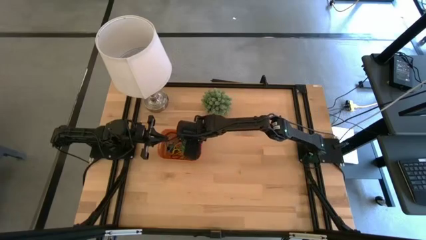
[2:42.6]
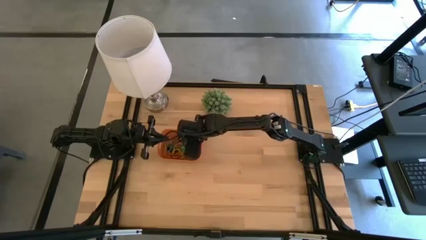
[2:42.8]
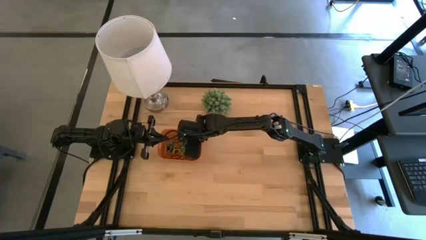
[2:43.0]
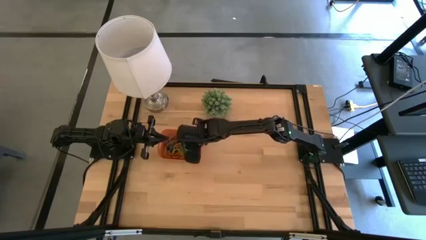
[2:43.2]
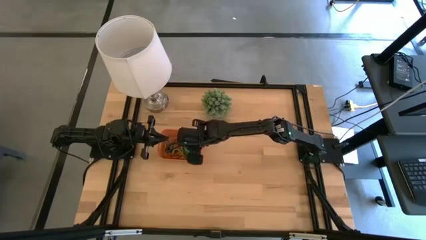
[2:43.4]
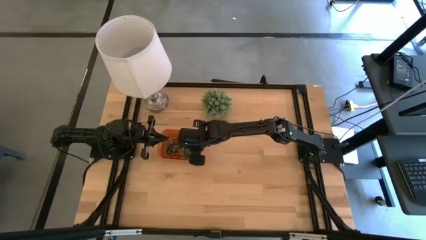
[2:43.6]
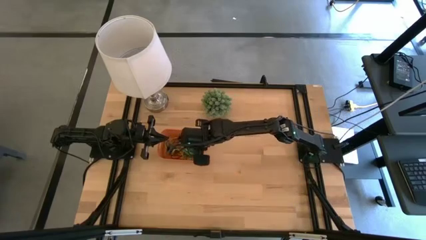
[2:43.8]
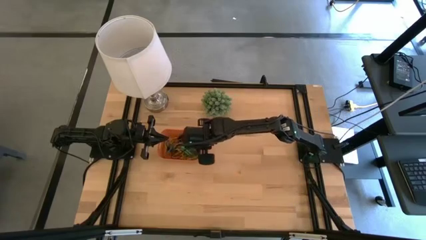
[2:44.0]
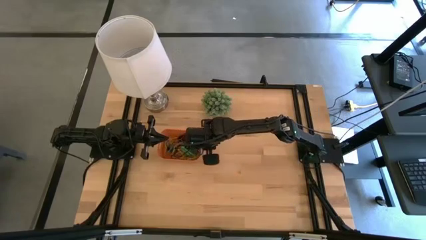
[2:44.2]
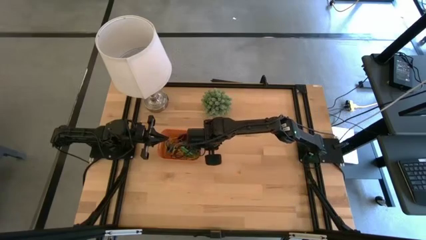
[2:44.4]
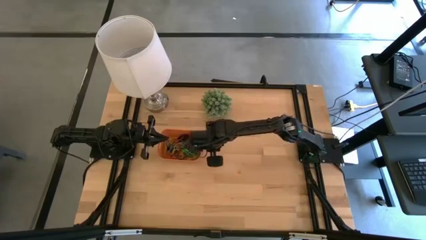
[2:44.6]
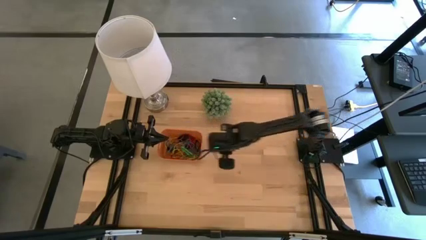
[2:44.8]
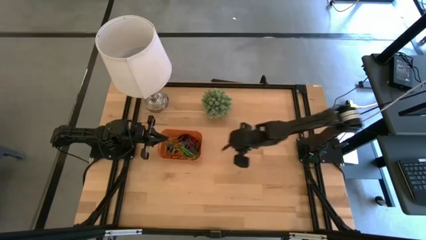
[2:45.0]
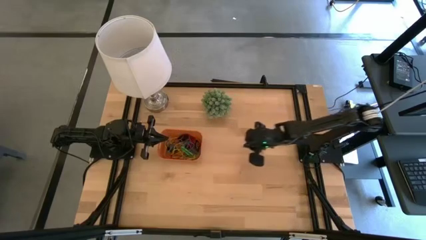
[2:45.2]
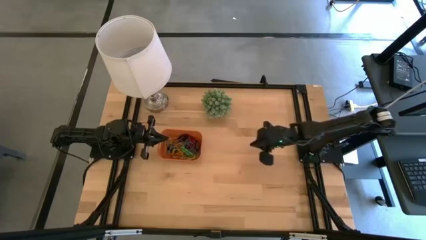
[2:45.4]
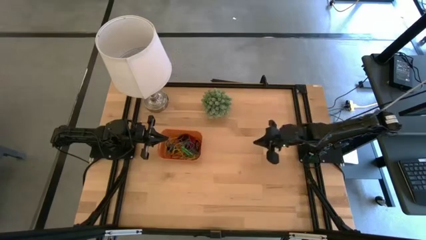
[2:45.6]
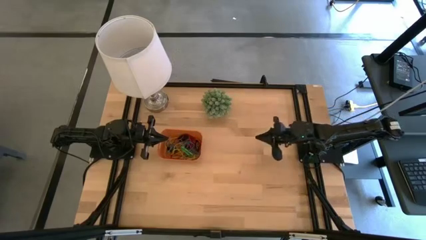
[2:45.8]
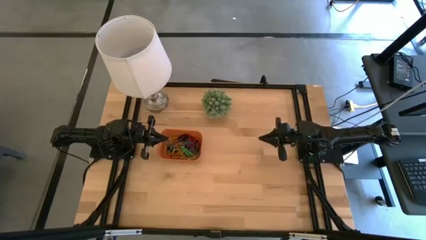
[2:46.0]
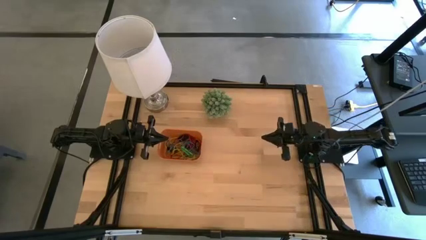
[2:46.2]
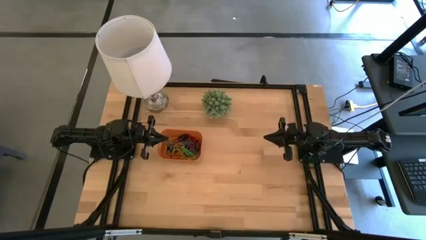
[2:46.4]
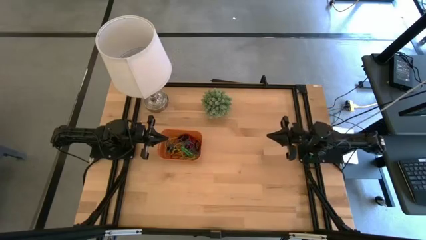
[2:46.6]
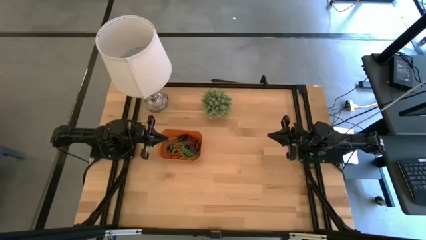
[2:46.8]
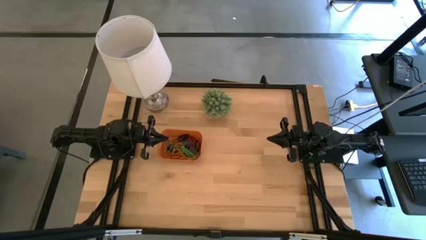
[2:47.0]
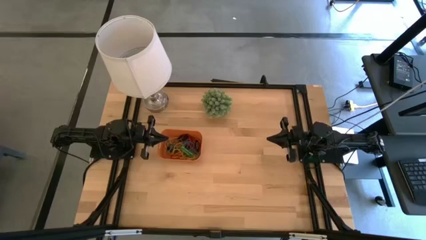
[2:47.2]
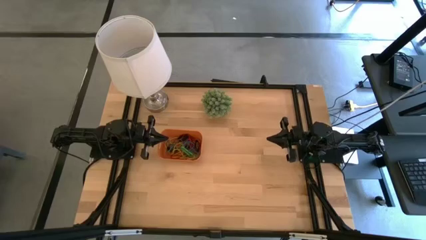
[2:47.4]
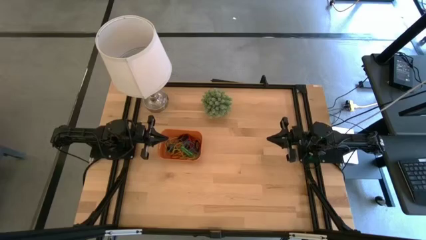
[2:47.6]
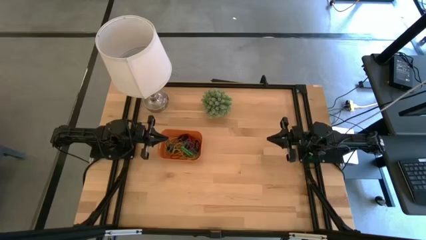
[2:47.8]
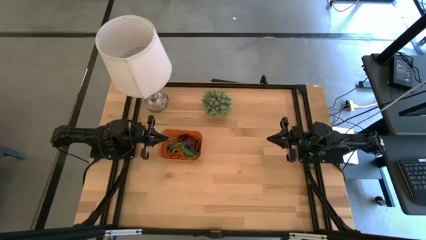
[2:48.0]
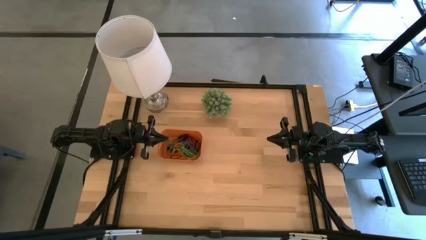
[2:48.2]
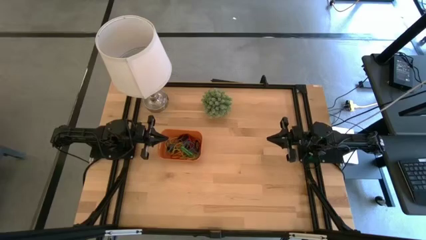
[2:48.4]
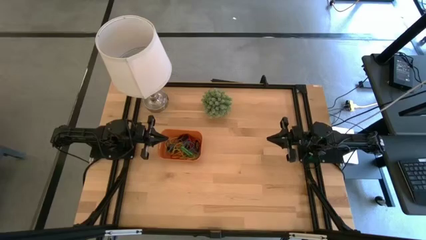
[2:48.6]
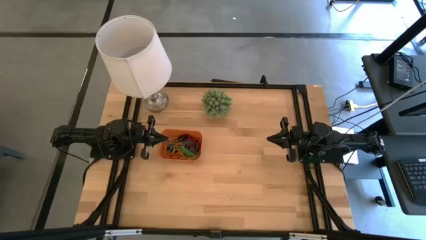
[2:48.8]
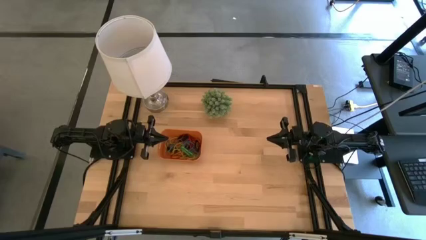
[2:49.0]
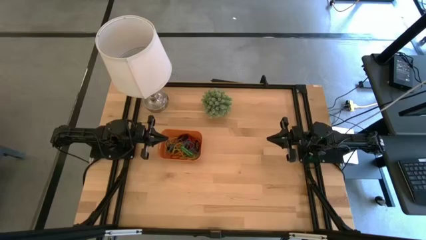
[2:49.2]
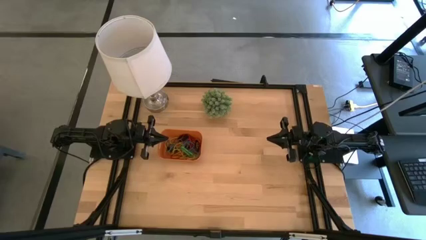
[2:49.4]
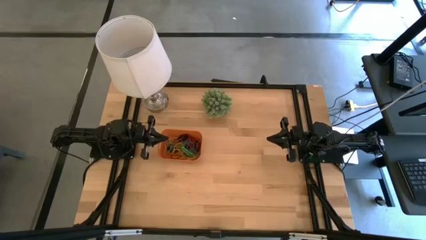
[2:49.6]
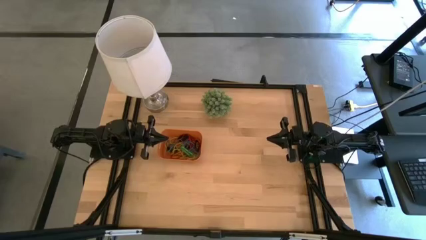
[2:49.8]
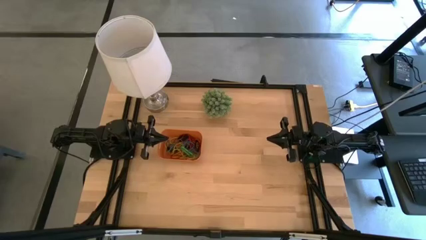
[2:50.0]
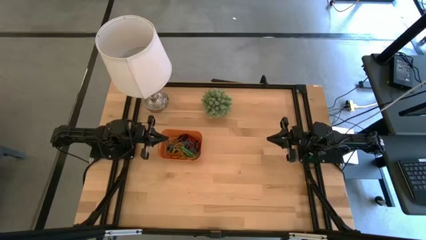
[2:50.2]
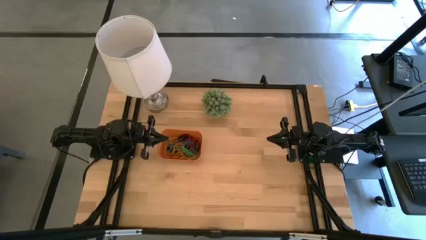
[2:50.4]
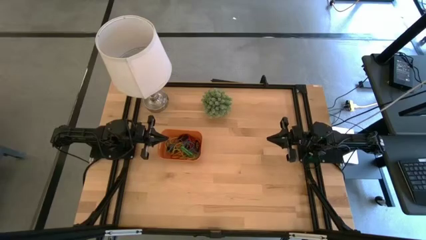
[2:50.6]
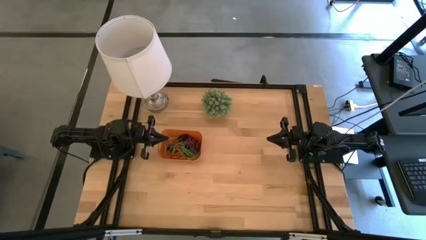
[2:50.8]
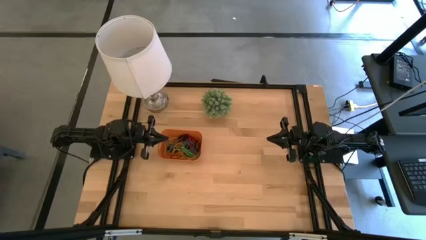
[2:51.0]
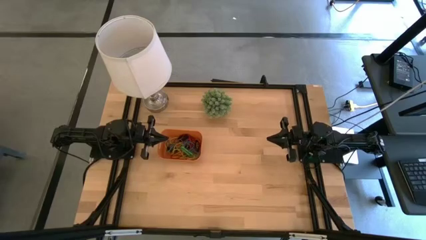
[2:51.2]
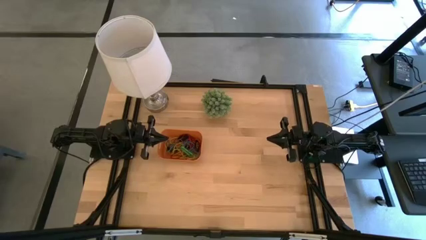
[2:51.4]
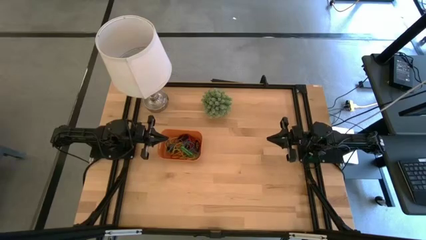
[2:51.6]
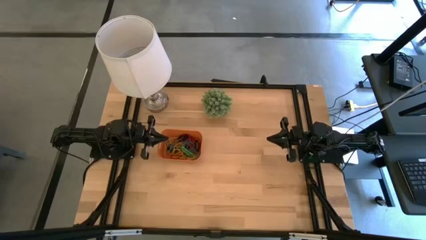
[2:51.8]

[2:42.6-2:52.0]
Task: Pick and place rubber bands into bin
Return to Home Position

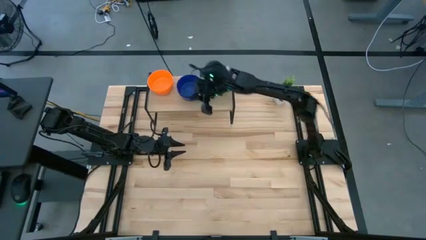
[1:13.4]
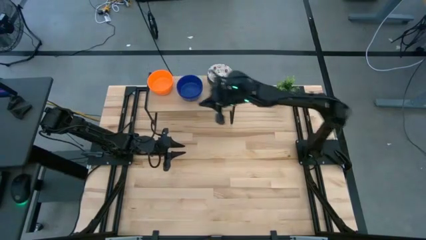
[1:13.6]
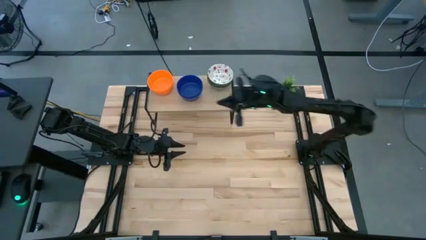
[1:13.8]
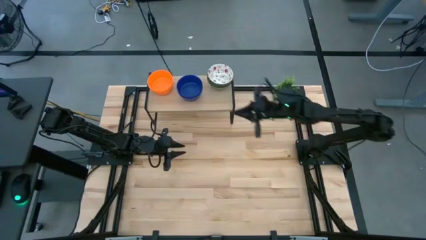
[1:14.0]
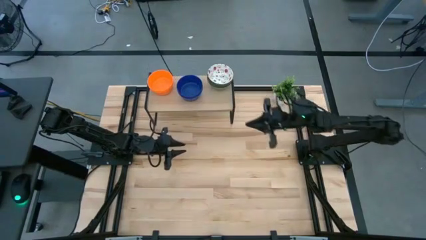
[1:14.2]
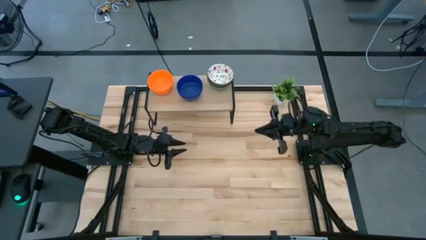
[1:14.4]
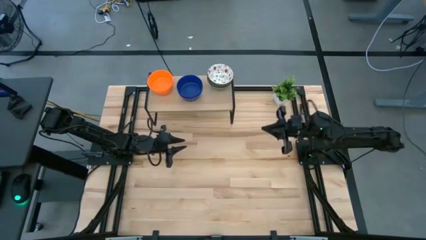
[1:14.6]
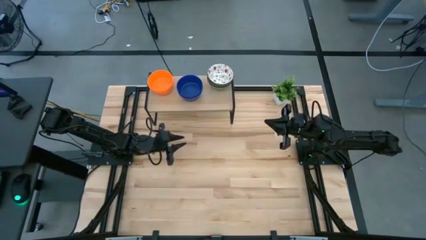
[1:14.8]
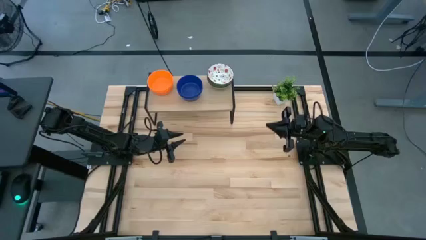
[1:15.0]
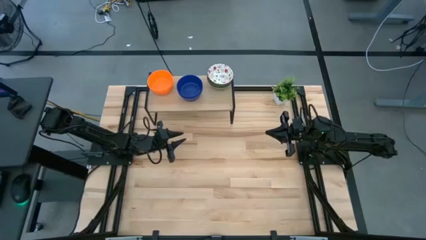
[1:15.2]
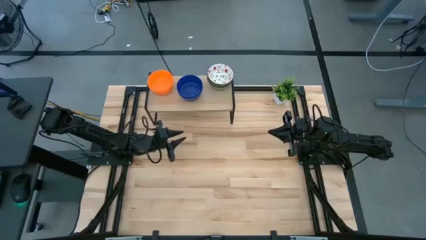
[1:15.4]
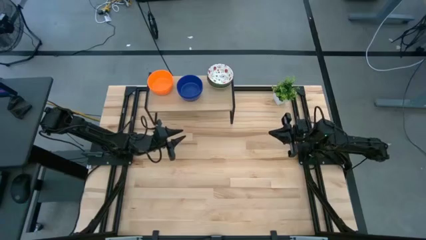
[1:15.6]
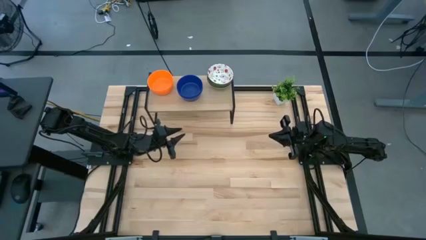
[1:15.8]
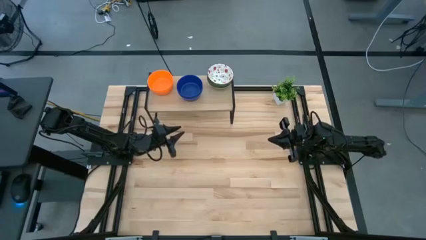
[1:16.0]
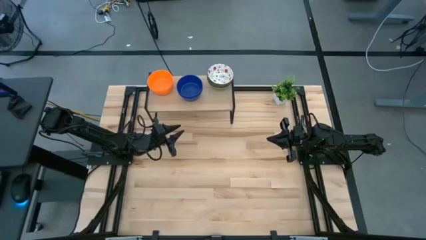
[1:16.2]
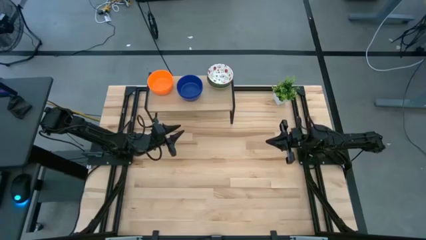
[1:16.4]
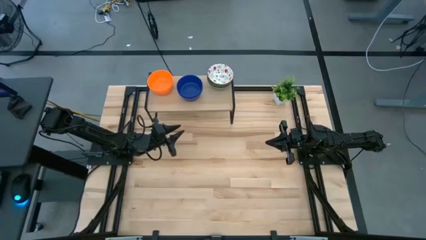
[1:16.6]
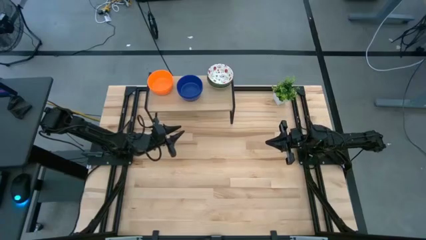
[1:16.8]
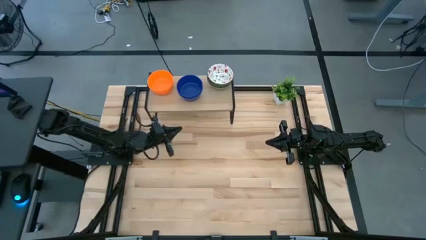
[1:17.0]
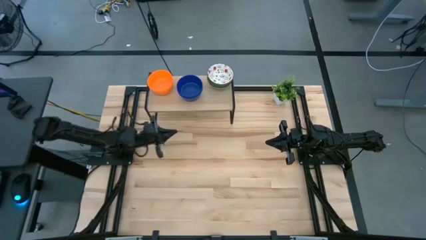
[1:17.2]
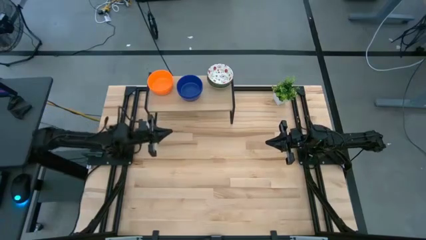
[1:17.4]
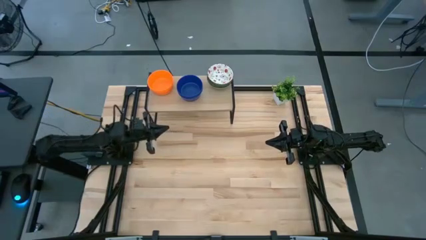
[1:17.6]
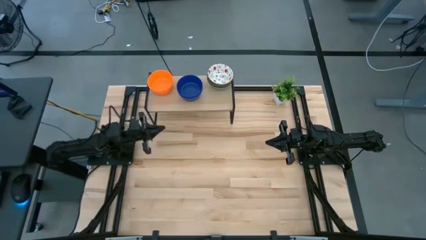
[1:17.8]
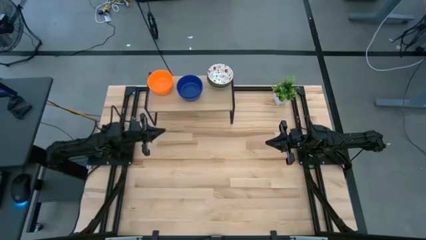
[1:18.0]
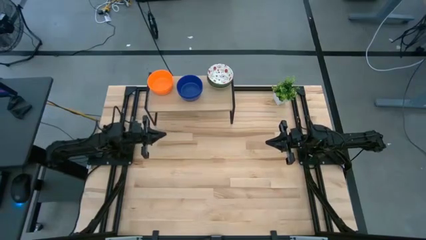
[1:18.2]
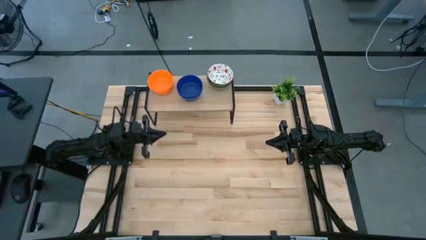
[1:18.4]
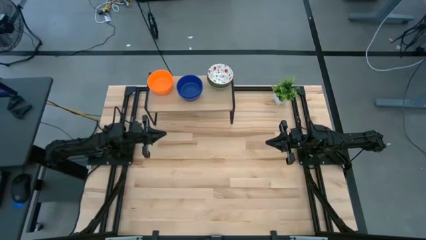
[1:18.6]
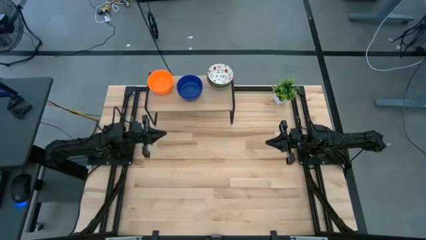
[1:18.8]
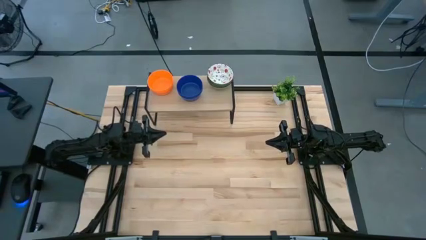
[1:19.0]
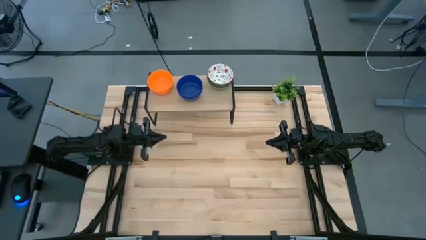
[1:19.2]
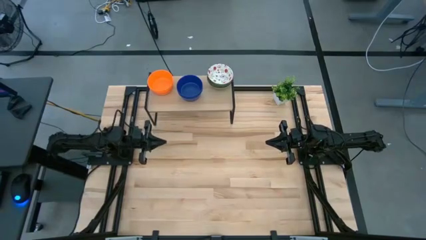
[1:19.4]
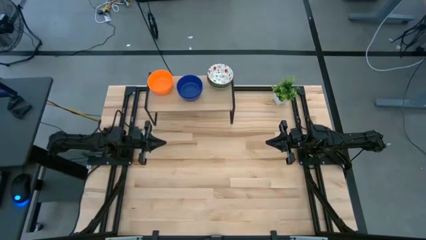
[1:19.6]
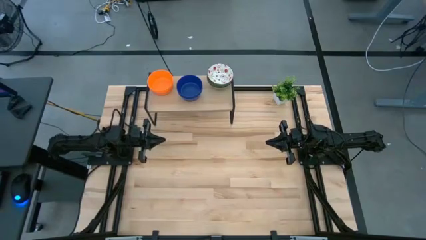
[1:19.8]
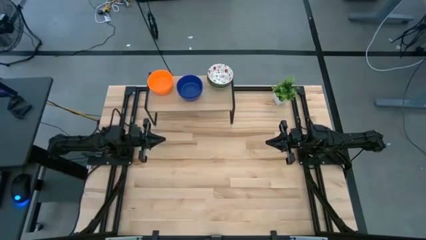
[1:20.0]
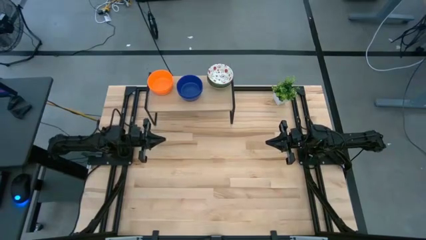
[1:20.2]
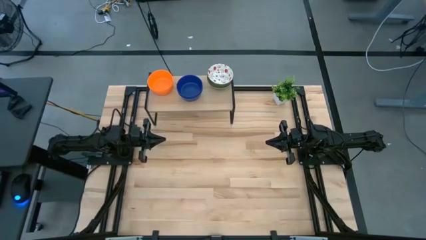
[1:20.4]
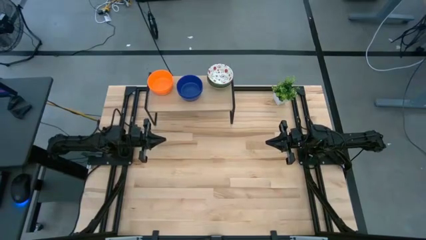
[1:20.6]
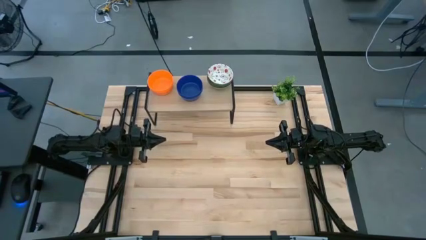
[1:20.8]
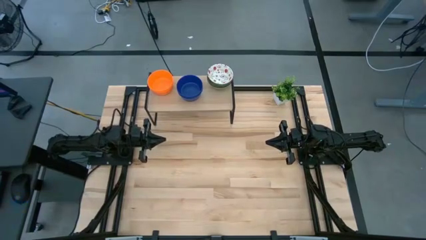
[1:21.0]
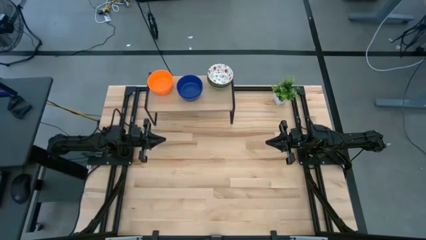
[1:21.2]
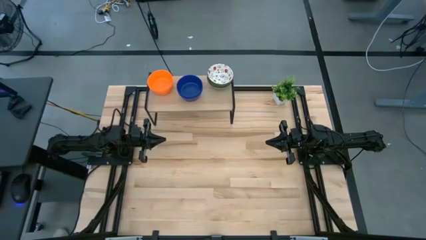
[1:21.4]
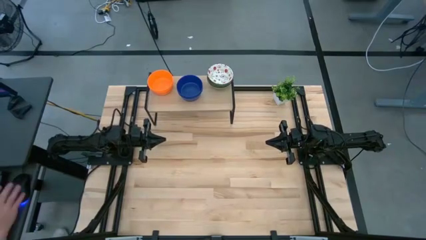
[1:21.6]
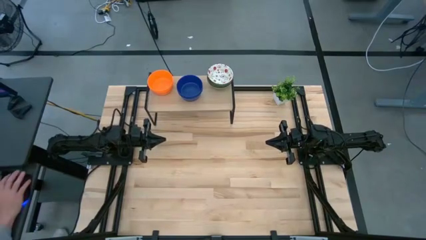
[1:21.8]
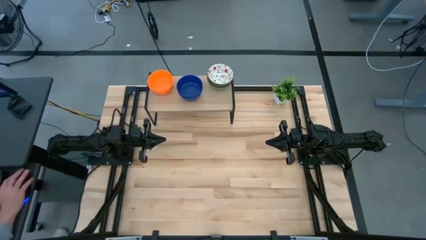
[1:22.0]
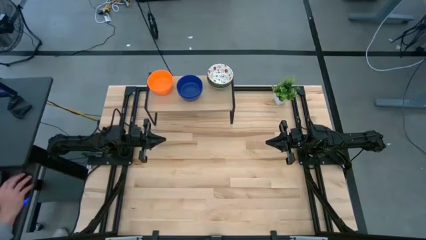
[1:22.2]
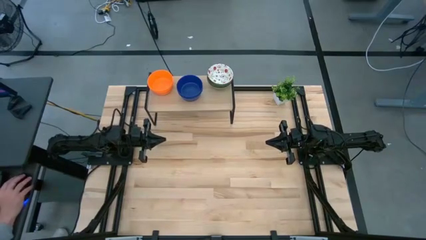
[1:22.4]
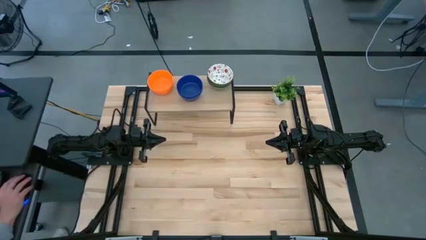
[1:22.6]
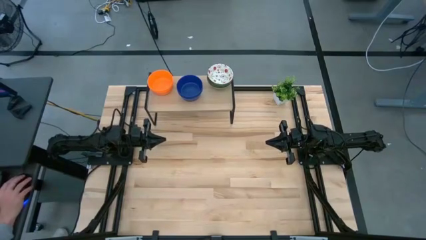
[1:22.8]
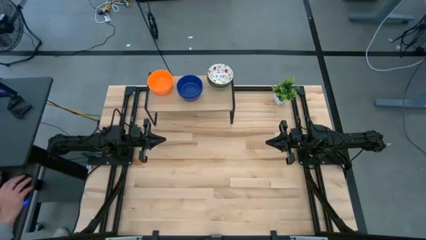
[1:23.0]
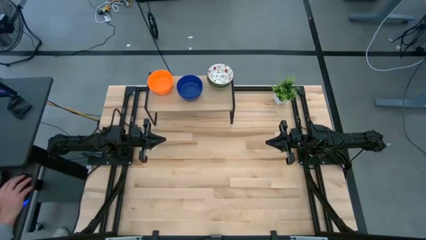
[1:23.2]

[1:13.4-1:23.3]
Task: Pick & Place Mini bowls
Return to Home Position
